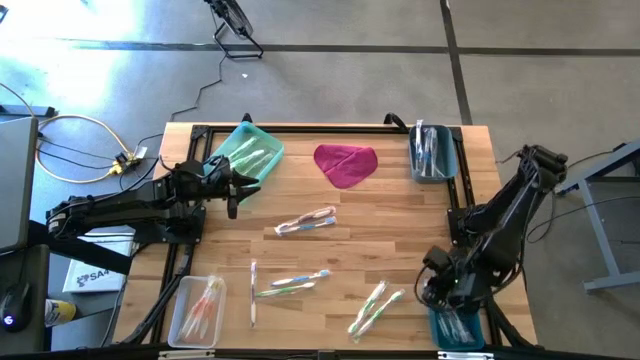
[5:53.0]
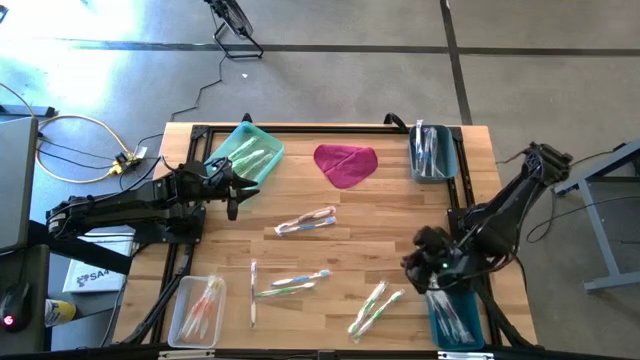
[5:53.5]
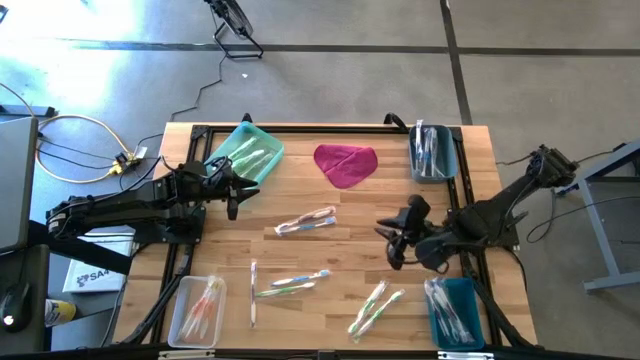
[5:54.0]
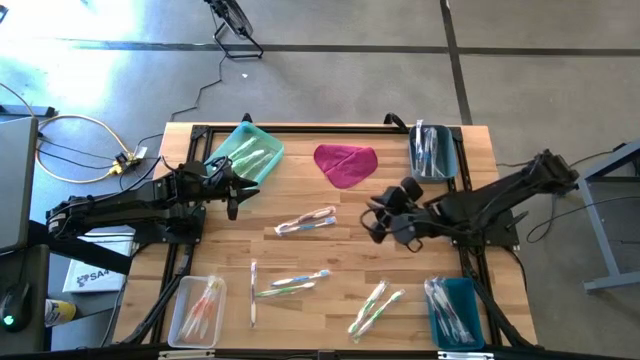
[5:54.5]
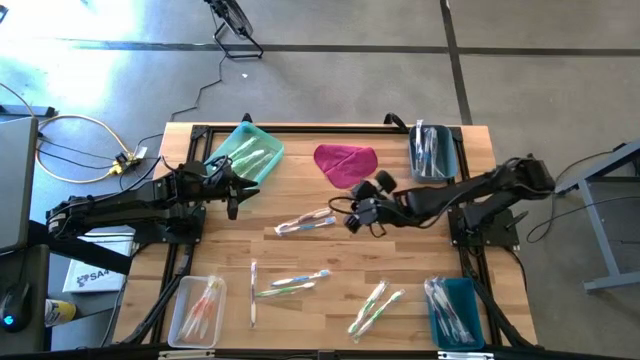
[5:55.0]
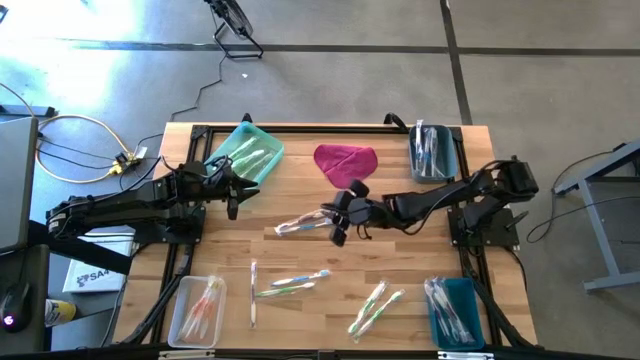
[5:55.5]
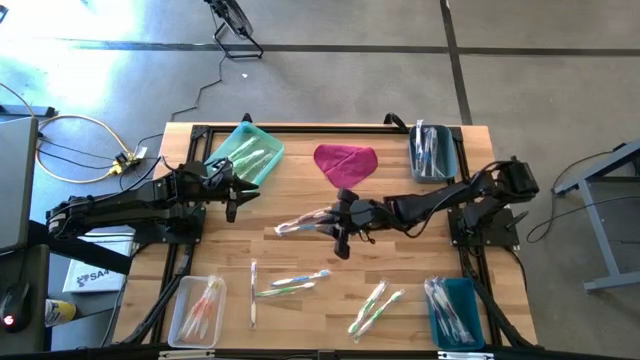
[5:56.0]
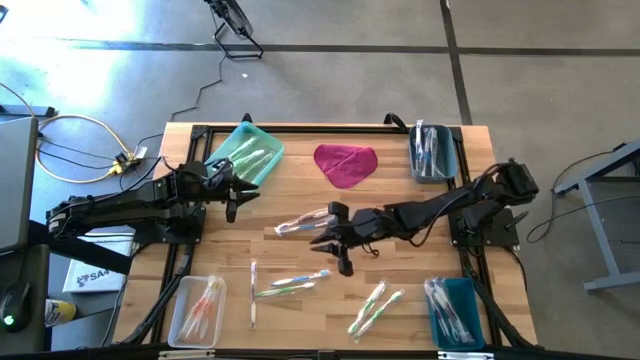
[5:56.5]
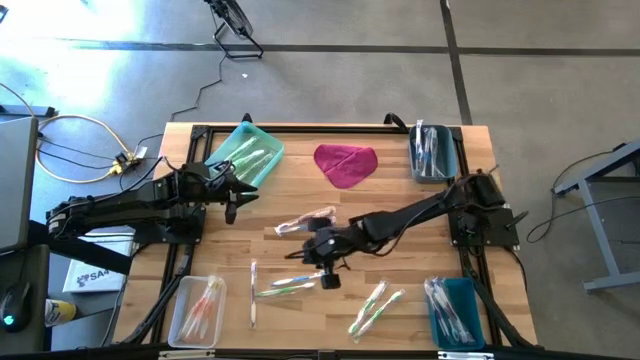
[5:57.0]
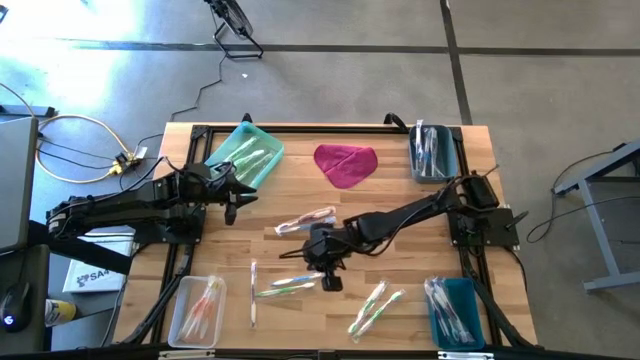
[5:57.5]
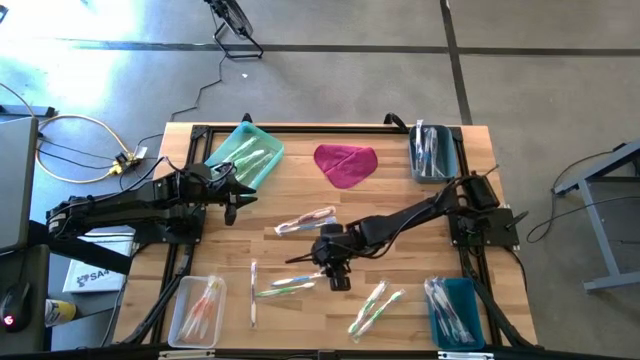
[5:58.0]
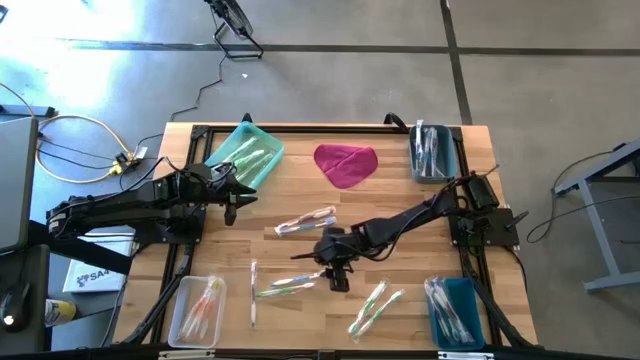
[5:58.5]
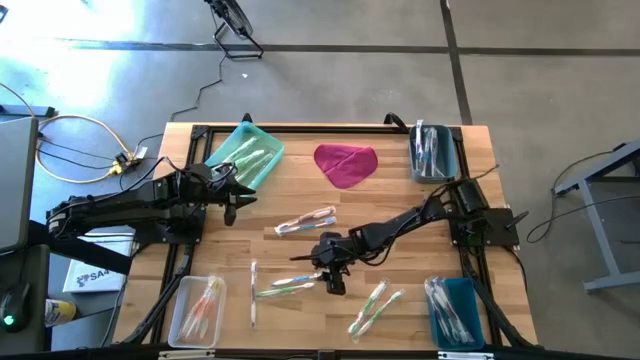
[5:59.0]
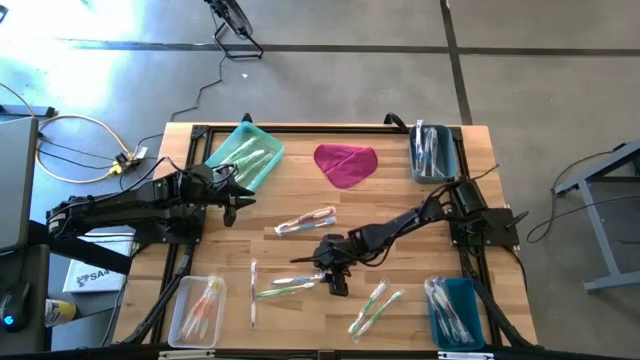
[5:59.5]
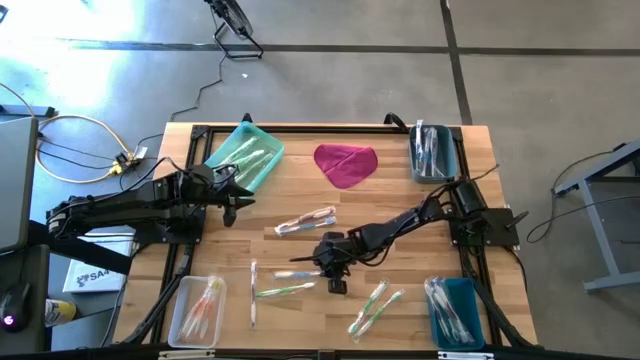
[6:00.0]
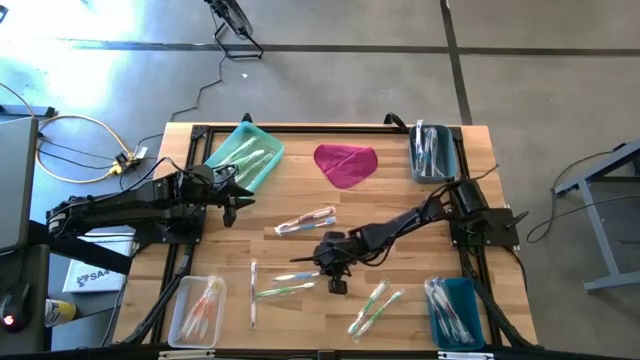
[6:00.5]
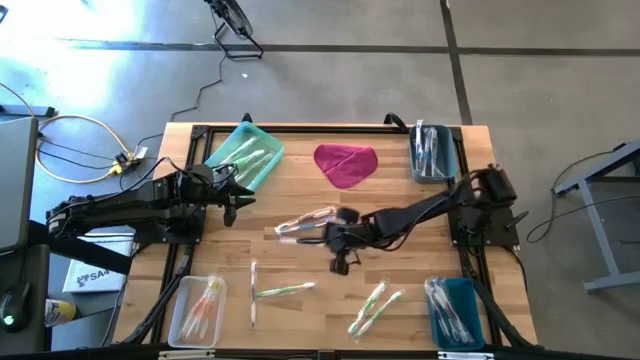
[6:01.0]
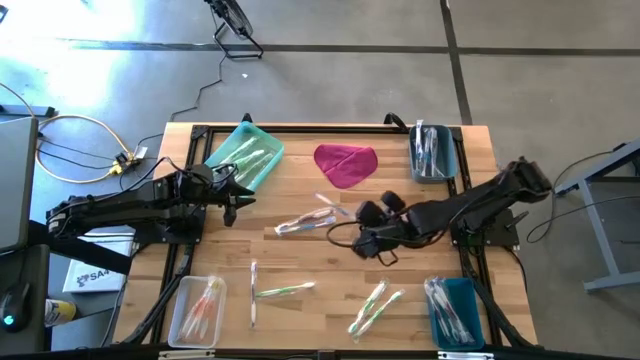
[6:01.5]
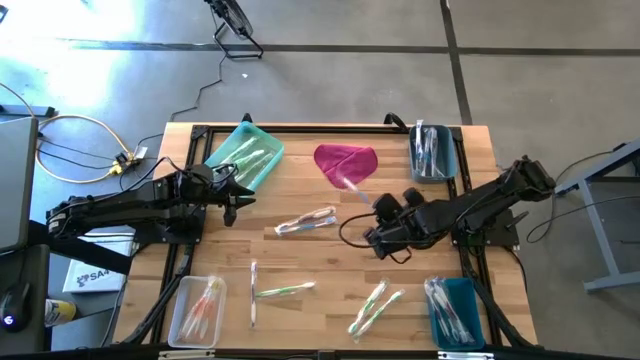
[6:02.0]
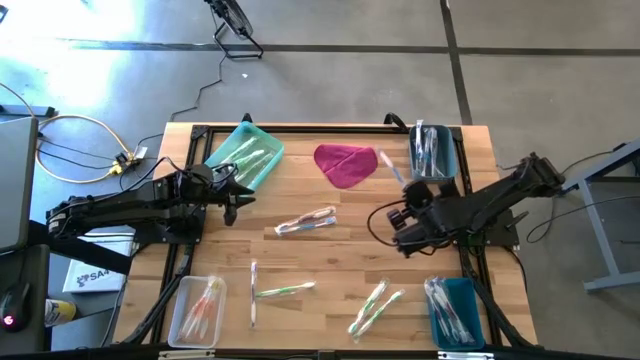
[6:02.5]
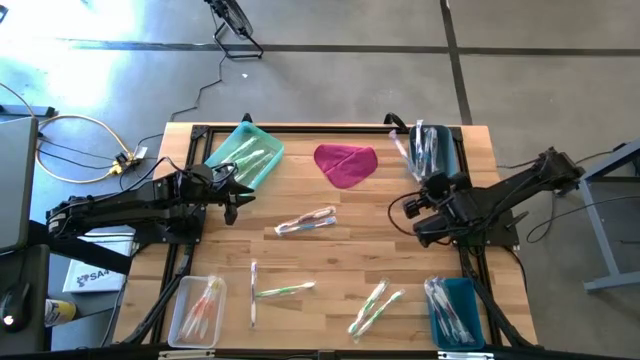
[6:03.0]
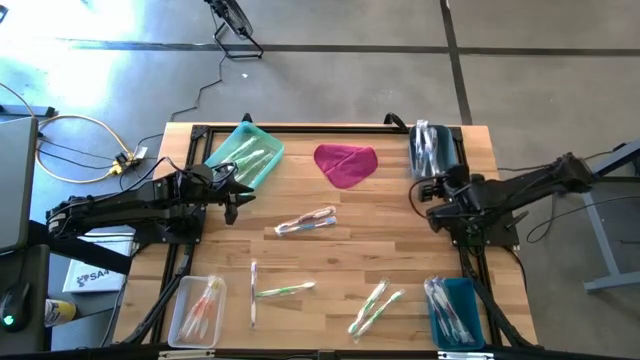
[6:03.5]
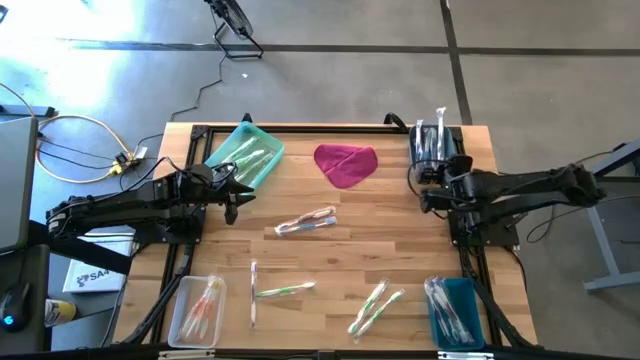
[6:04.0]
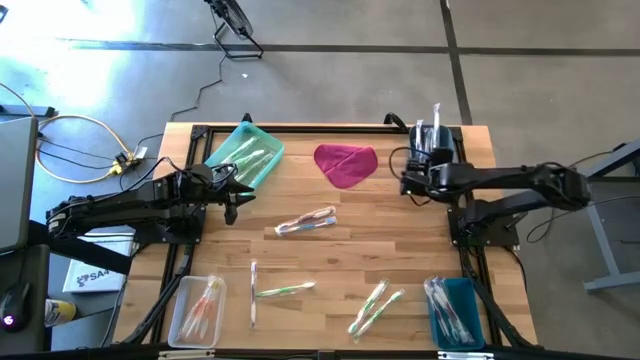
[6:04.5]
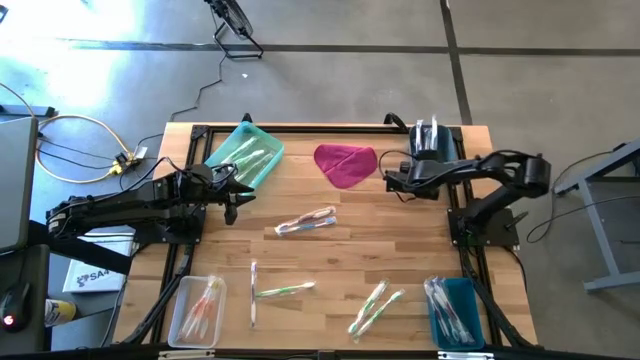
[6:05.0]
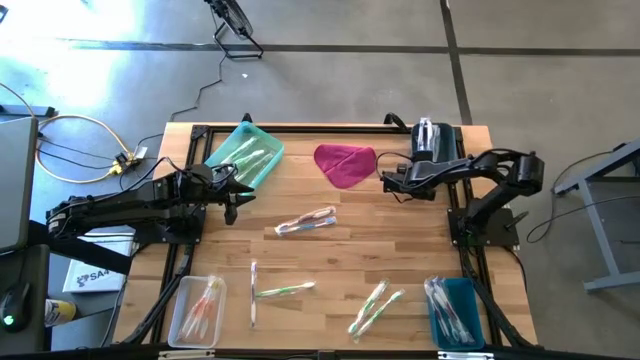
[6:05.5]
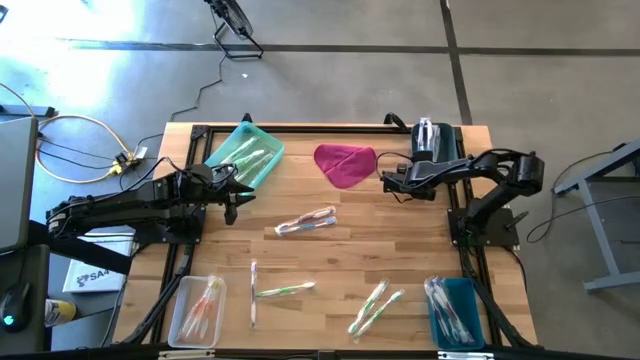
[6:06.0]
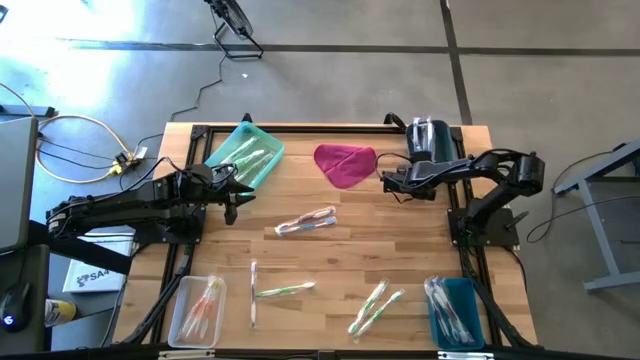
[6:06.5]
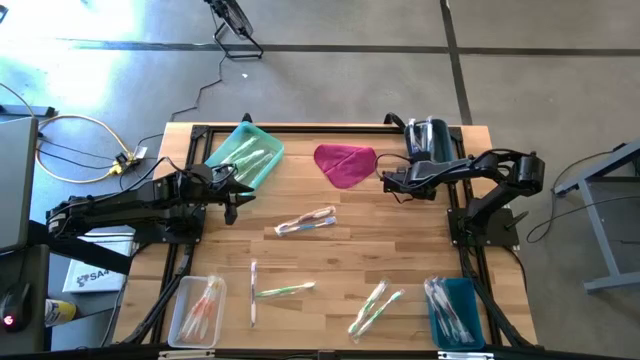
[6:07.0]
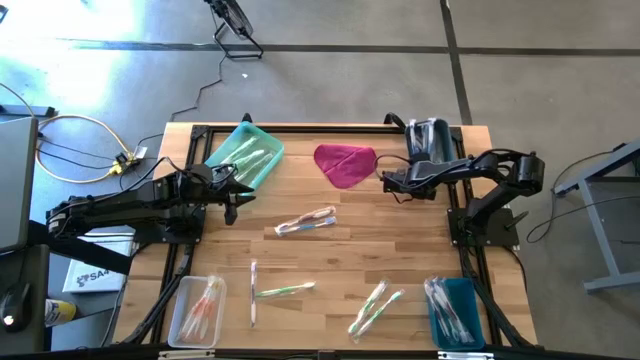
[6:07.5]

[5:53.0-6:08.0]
Task: Pick & Place Toothbrushes
Put the blue toothbrush to the light blue bin

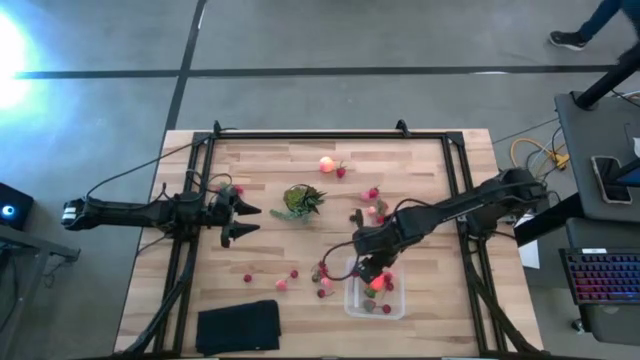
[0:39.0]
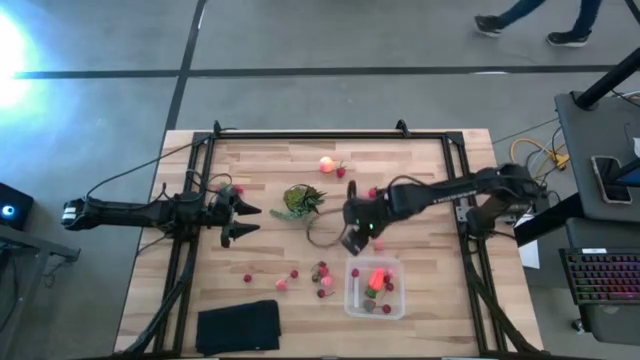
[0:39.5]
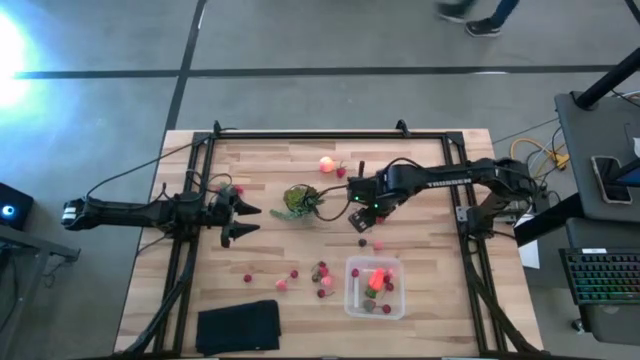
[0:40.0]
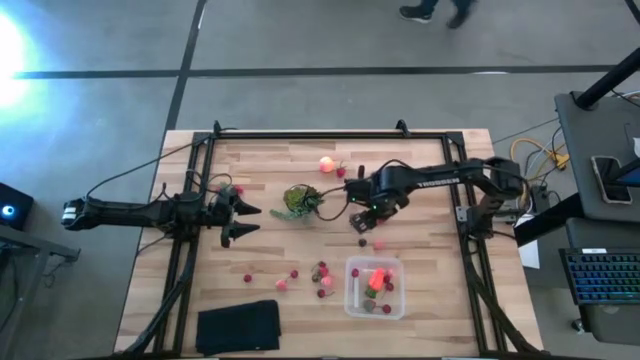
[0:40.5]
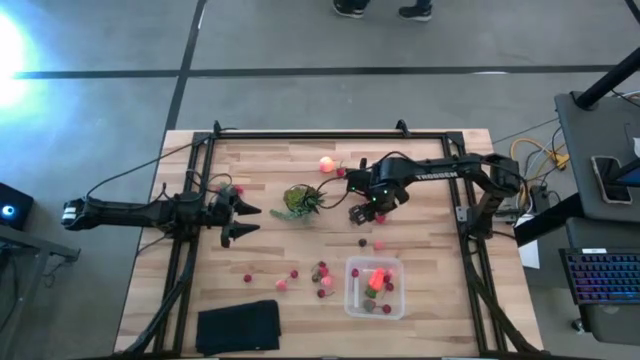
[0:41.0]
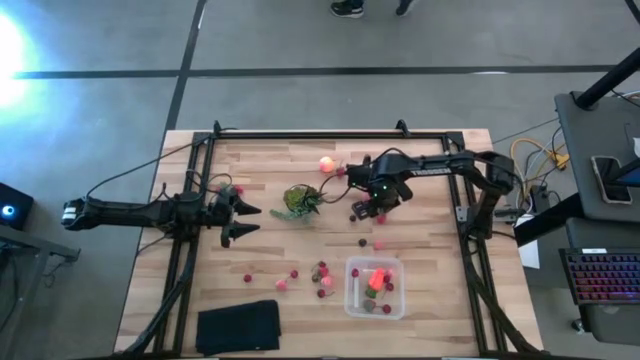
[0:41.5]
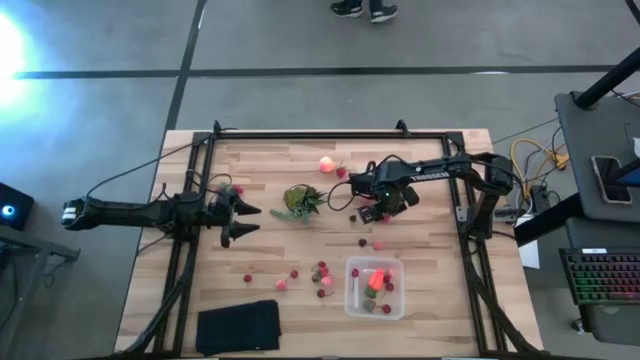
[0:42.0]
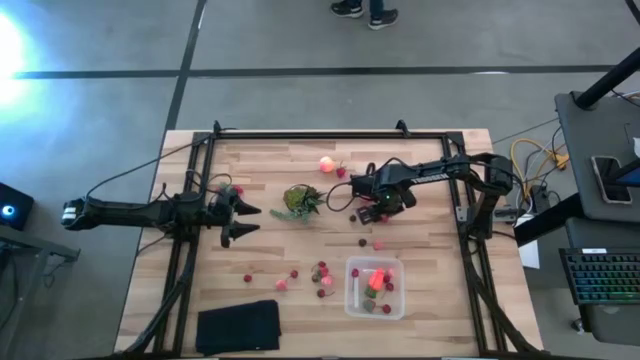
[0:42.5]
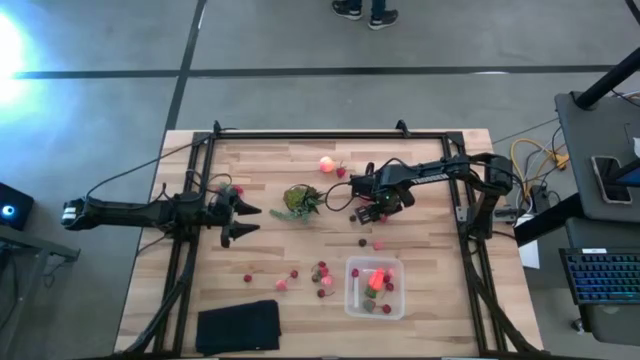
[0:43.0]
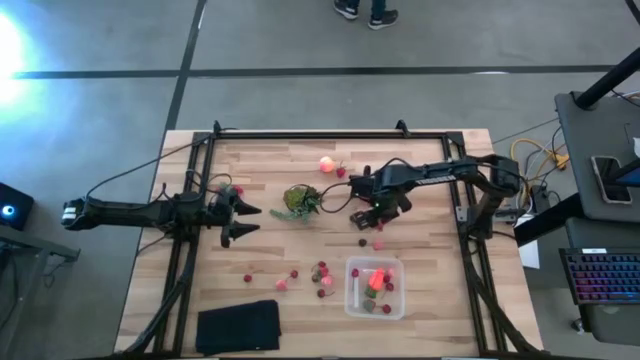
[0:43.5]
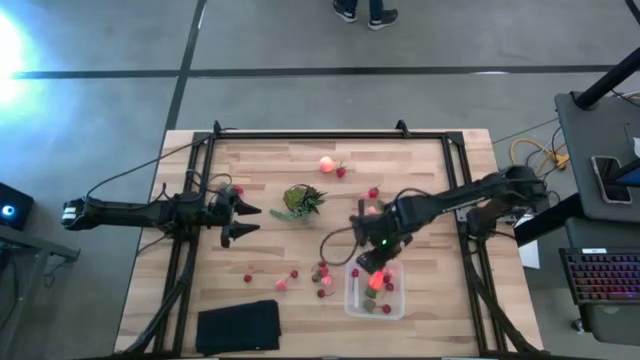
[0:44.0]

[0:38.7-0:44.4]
Task: Pick and placing Produce into tupperware
Put the strawberry into the bin

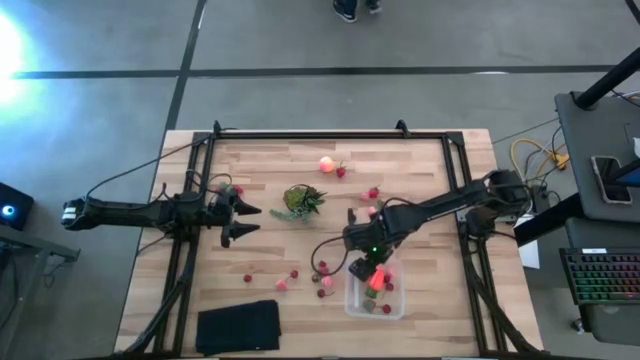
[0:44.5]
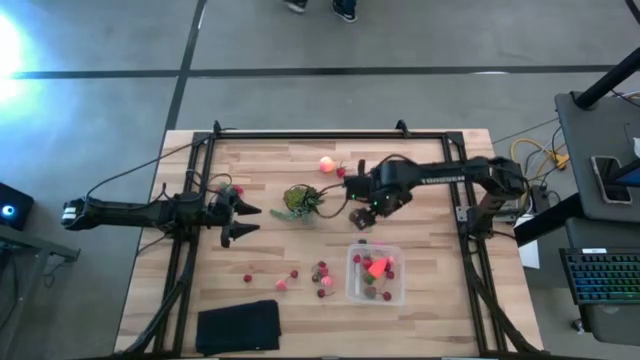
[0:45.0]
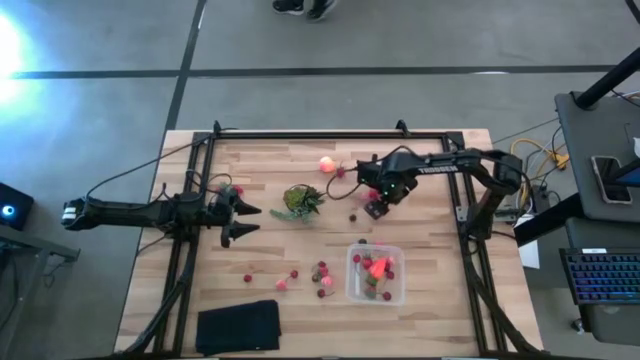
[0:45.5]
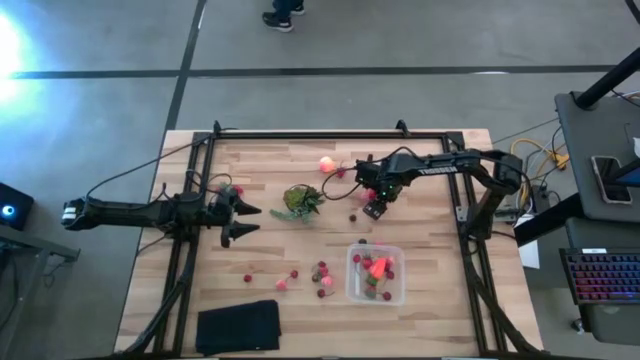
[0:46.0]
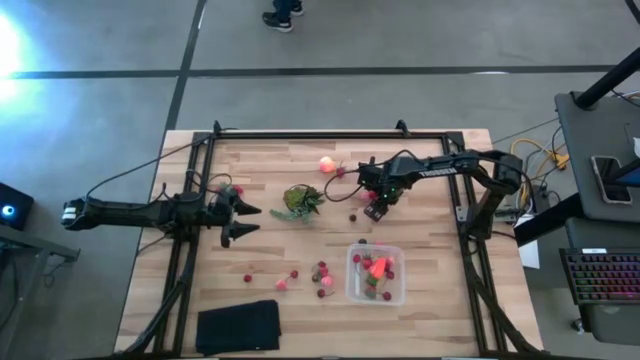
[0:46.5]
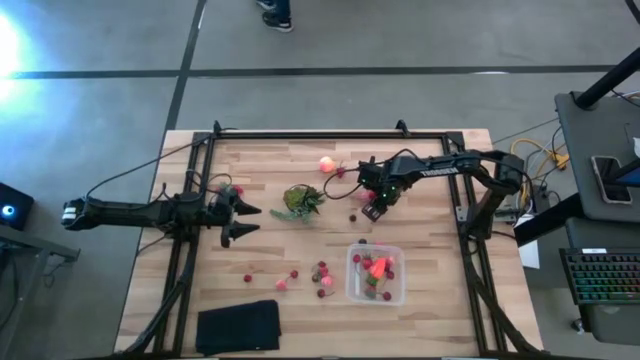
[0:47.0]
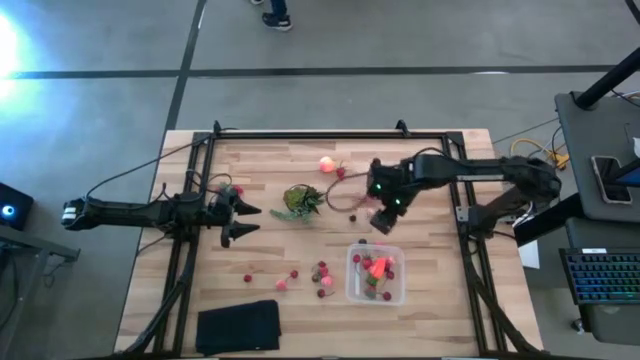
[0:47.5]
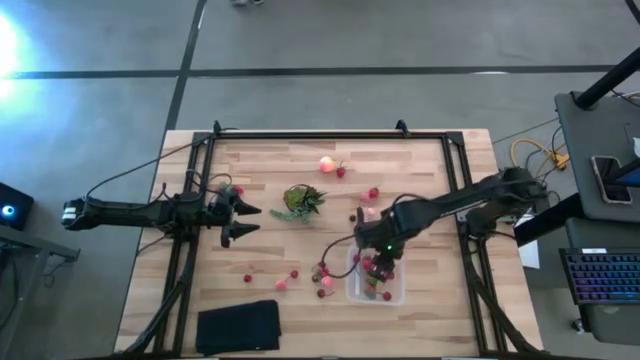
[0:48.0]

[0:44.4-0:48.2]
Put the strawberry into the bin
